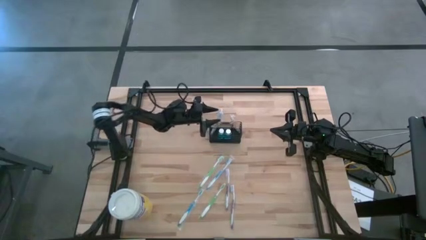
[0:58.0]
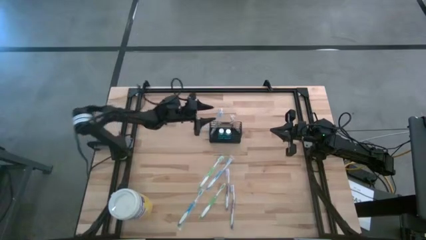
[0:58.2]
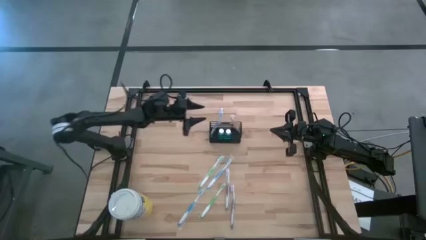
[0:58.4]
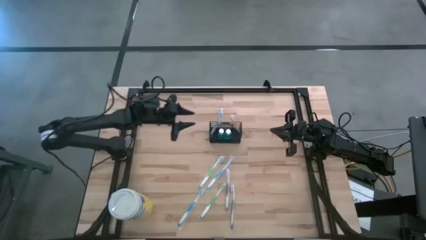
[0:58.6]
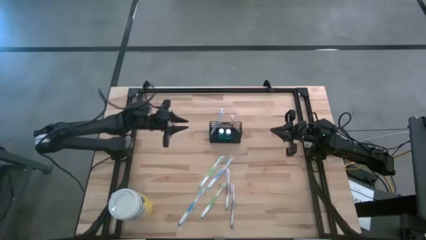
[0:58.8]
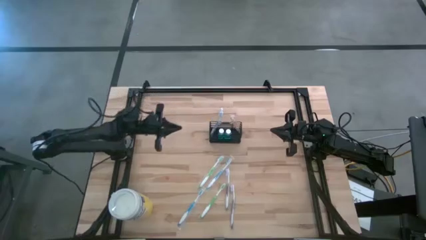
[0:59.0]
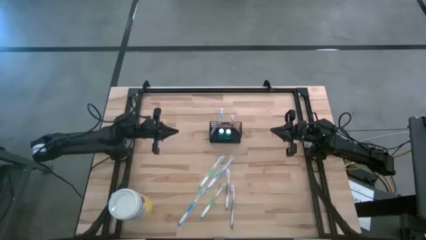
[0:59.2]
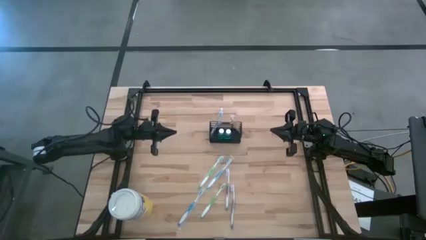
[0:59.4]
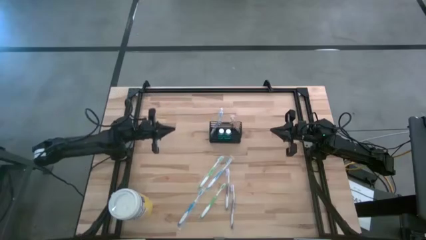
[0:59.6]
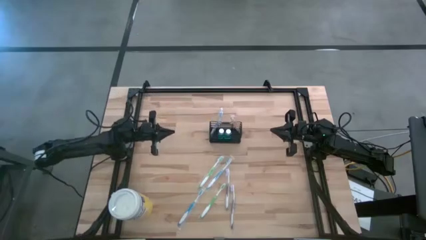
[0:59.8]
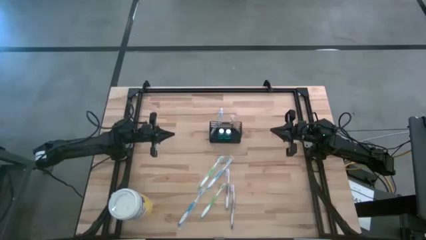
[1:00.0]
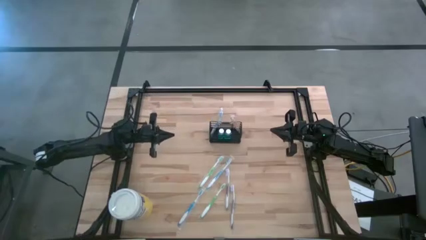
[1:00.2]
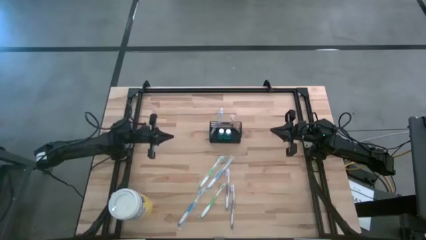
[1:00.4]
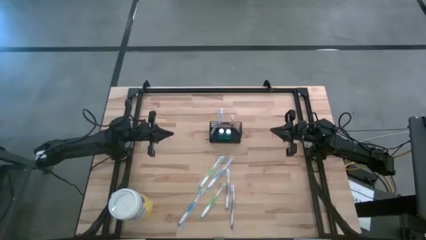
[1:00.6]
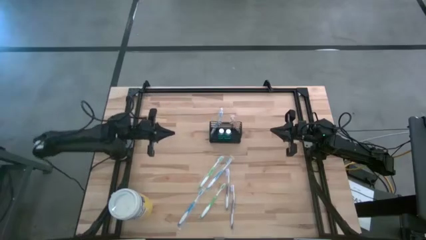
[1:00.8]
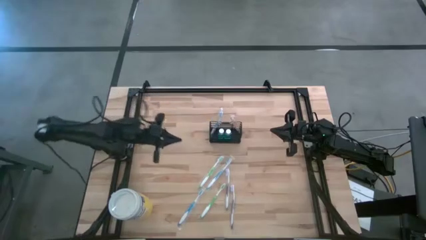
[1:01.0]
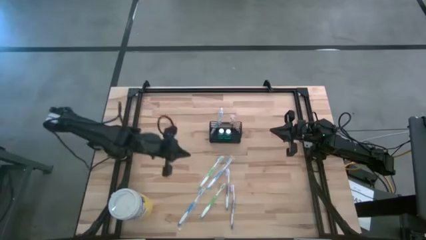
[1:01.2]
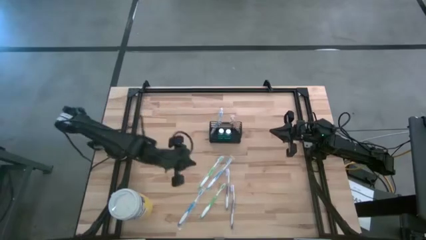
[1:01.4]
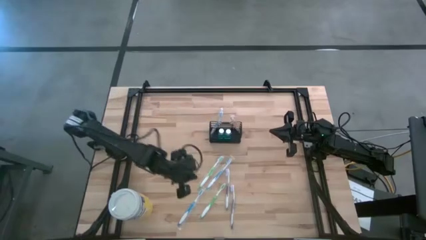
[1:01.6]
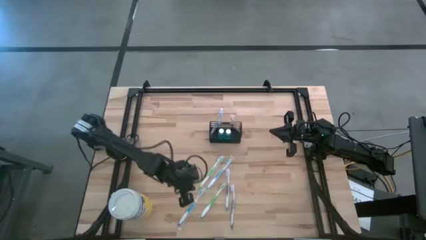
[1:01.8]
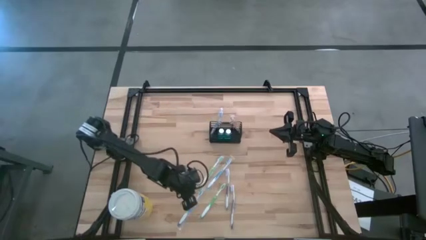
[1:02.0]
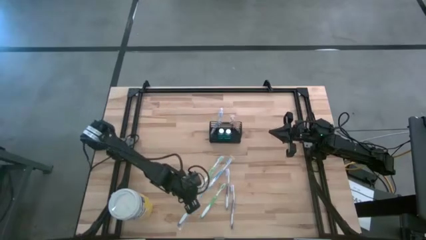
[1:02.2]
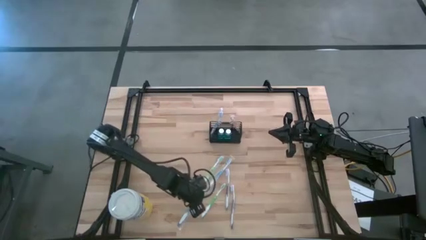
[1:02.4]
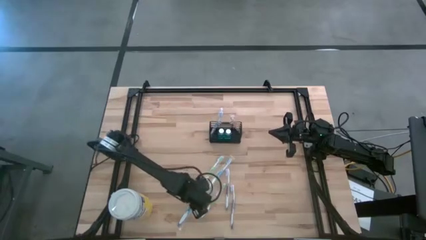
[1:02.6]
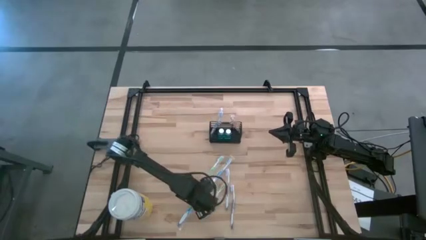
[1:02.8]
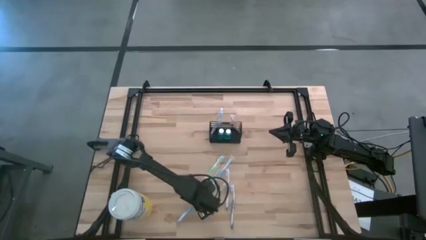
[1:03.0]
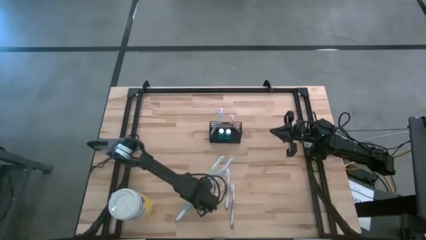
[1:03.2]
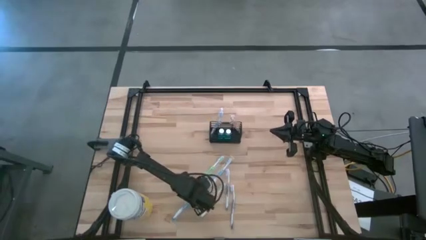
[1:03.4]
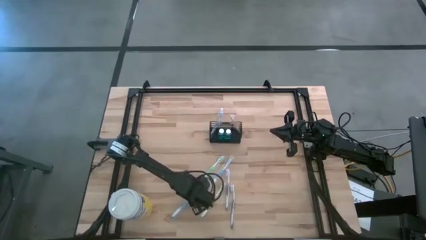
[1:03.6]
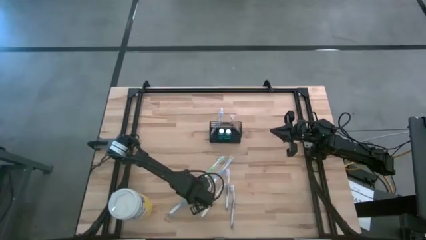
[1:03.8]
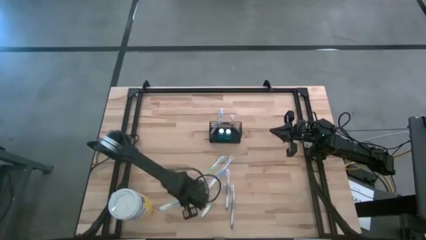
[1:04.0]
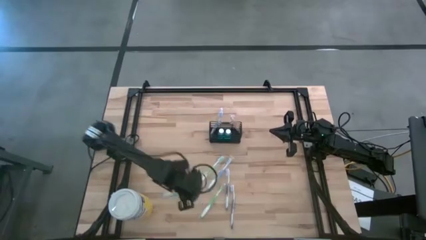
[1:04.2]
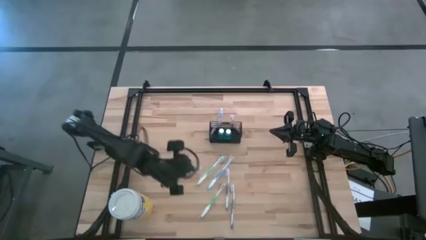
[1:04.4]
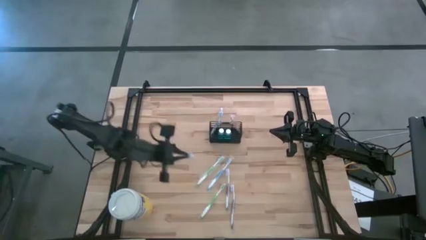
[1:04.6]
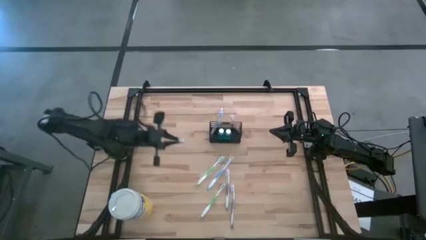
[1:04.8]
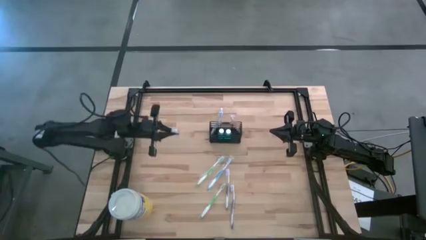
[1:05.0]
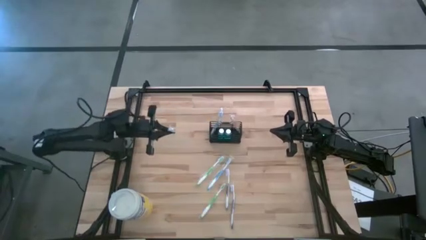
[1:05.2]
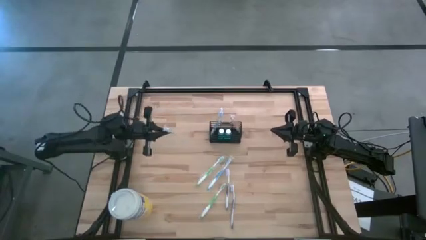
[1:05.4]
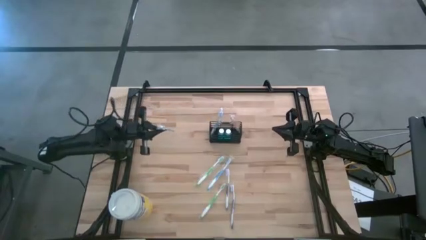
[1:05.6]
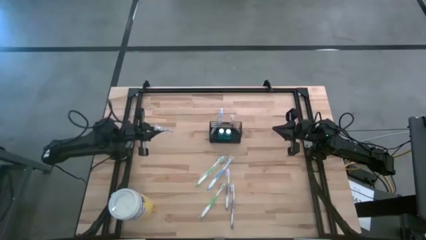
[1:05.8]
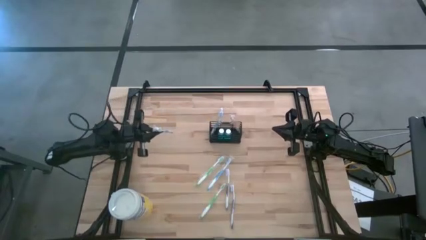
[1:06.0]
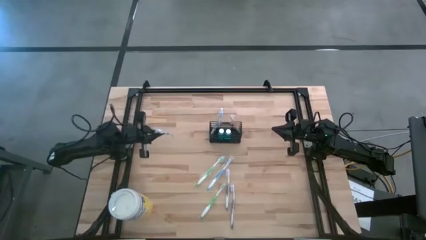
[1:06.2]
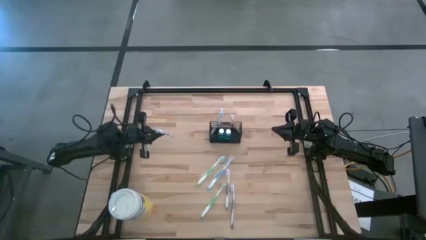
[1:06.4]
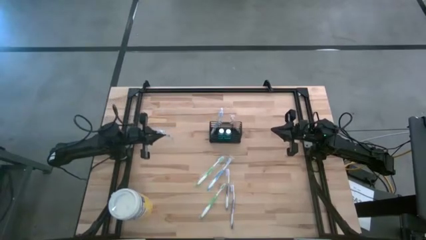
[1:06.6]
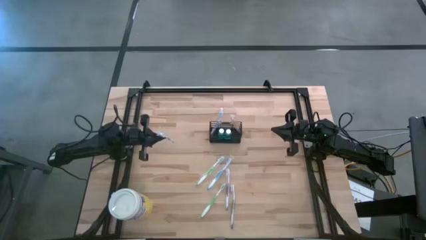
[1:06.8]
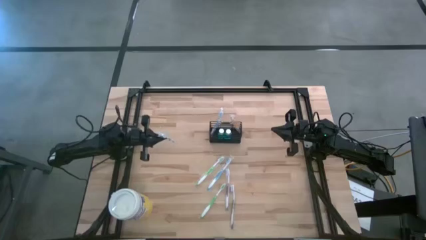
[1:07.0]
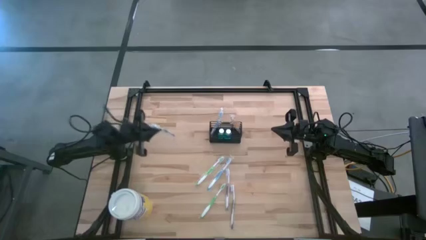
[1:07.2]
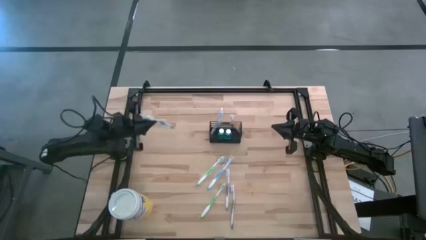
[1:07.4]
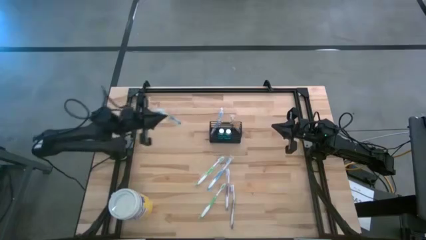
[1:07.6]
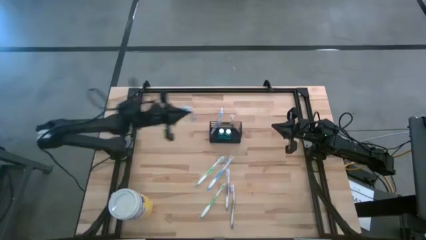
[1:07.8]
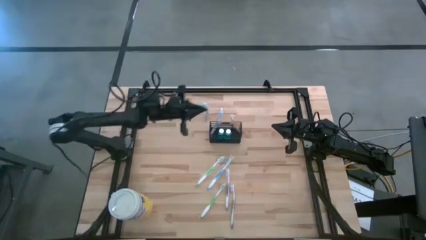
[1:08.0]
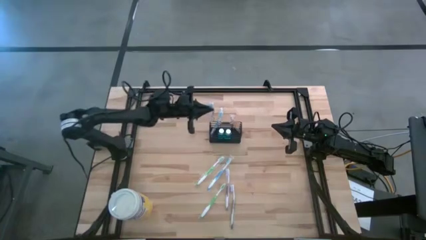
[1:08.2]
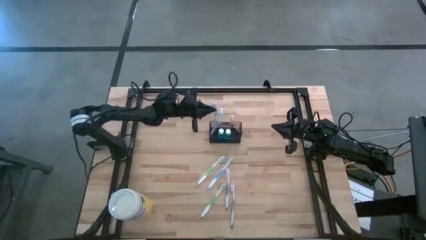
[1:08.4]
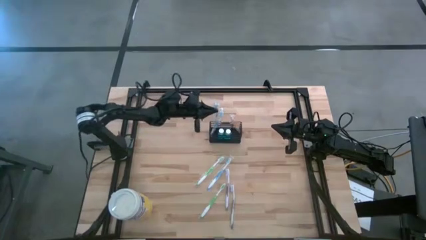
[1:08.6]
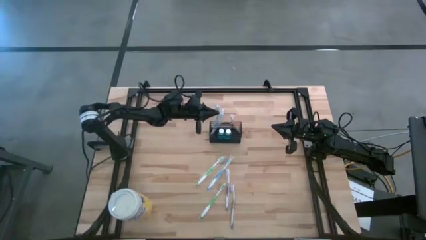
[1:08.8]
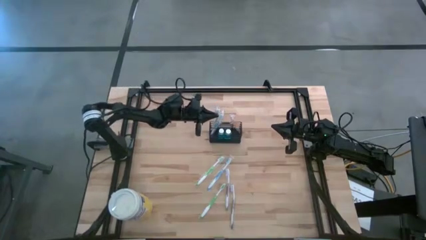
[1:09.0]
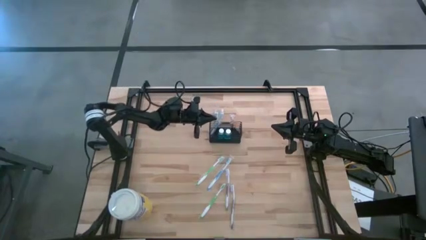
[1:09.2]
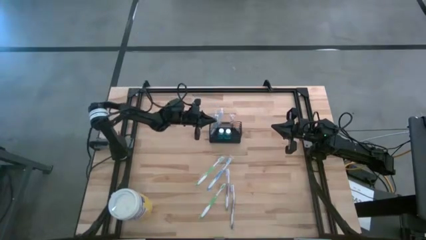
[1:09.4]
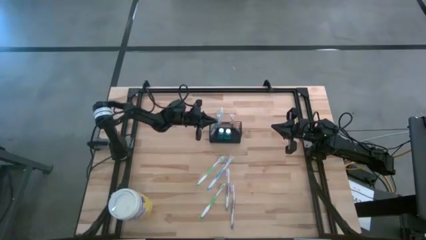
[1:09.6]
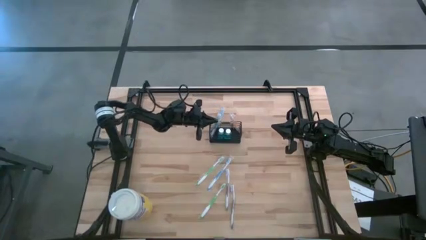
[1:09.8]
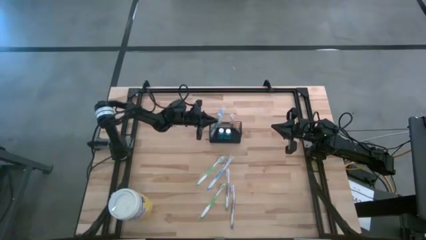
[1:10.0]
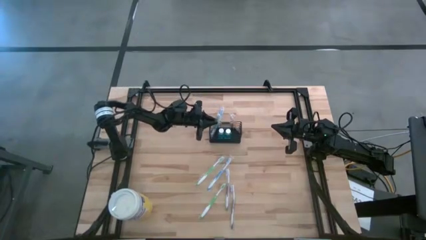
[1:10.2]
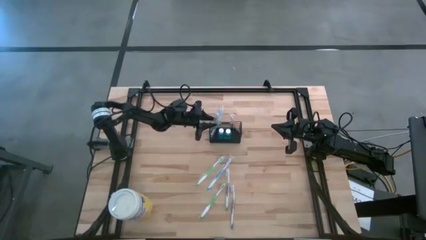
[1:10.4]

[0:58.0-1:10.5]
Task: Pick & Place toothbrushing station
Put the bottom blue toothbrush into the wire organizer
